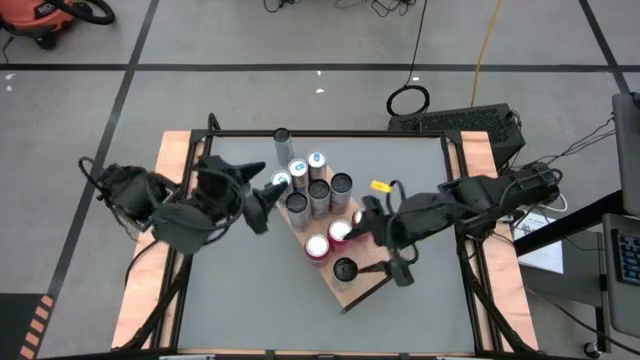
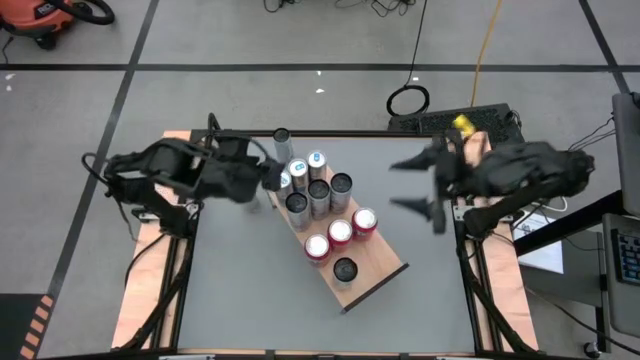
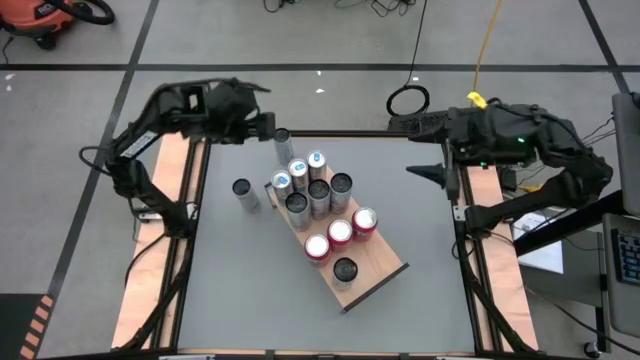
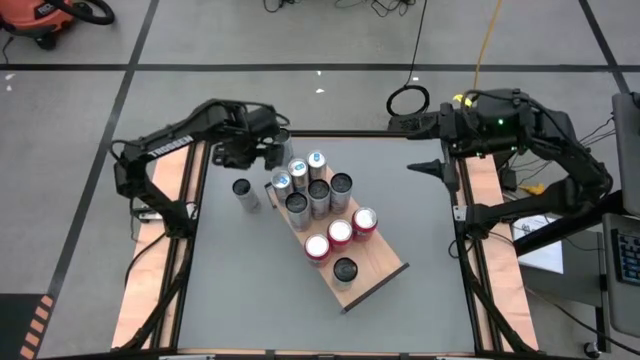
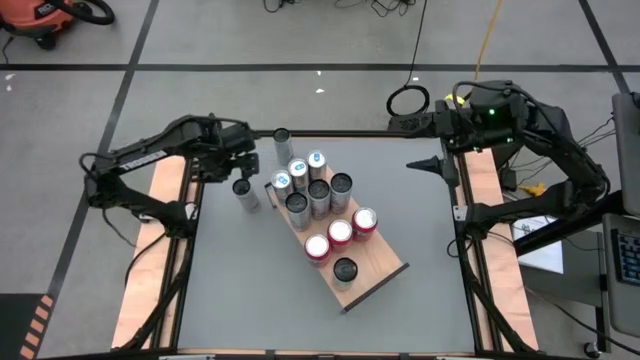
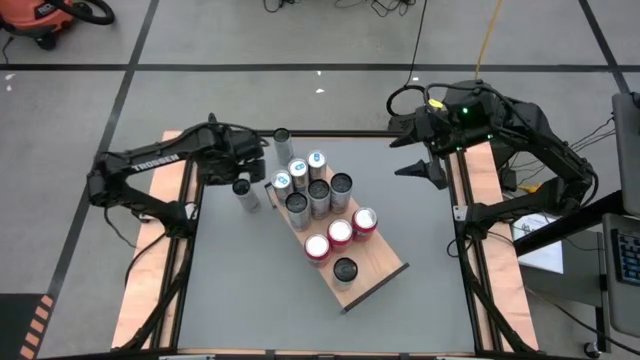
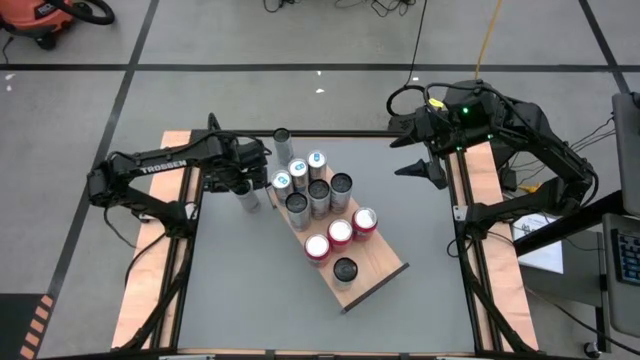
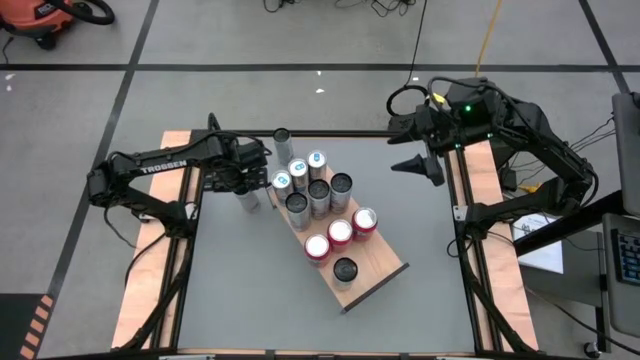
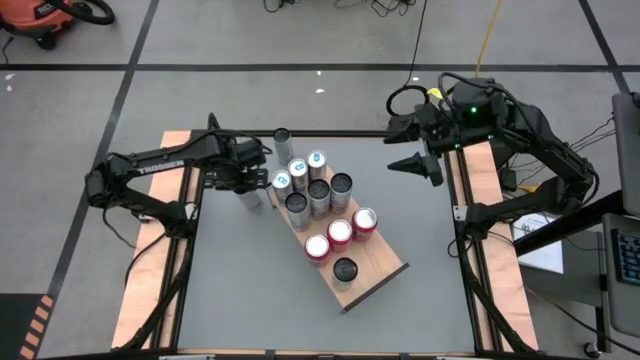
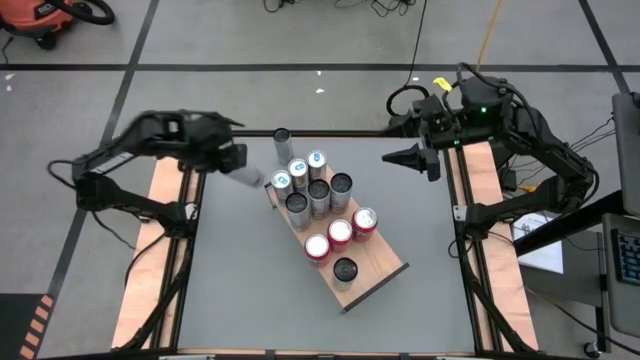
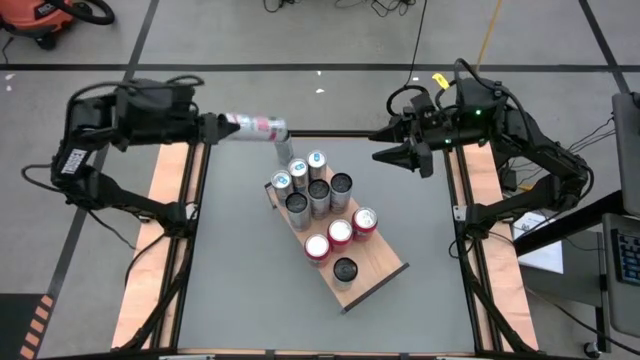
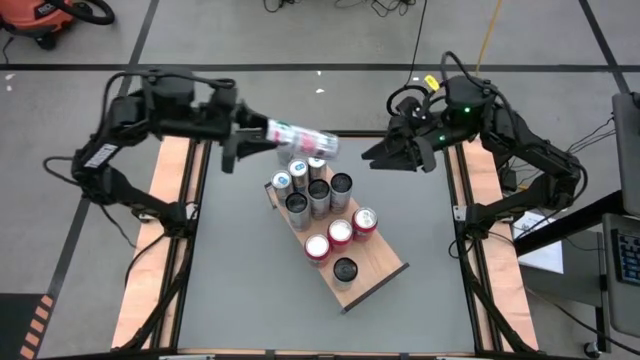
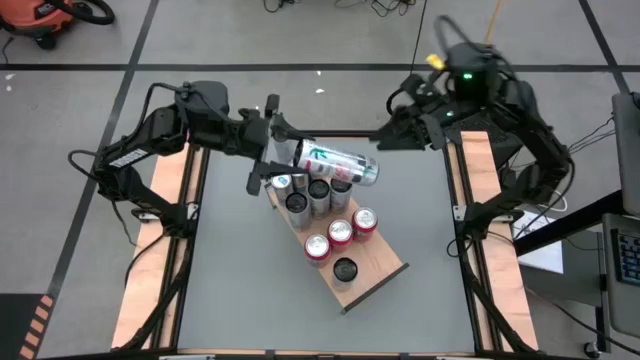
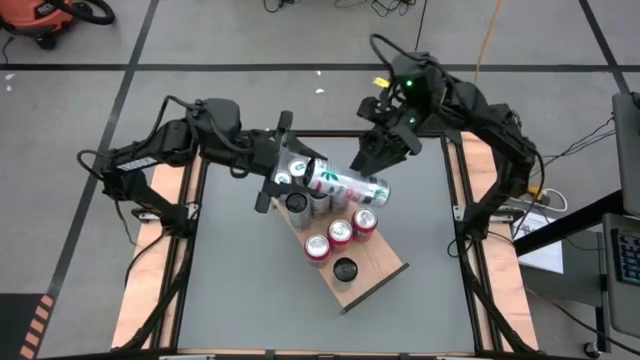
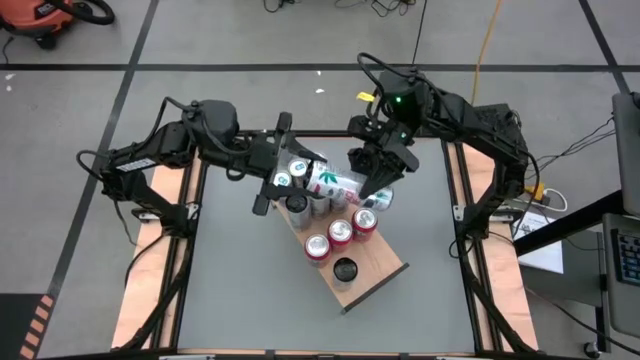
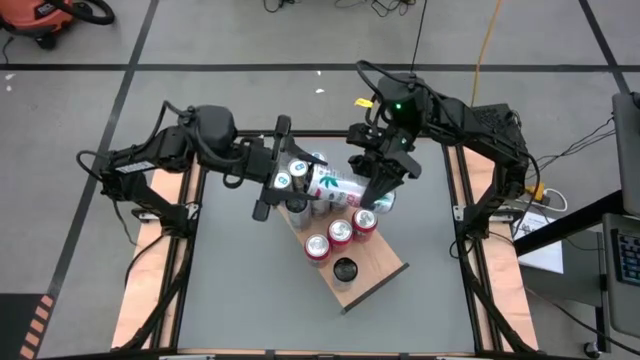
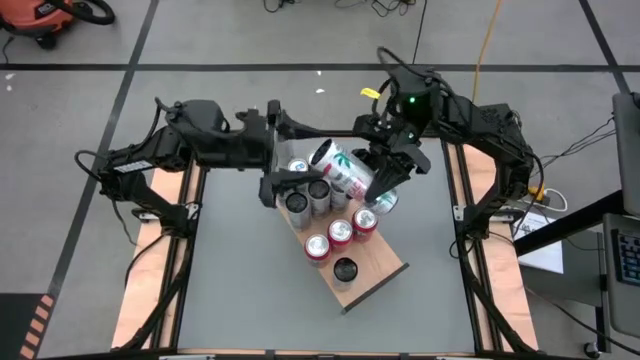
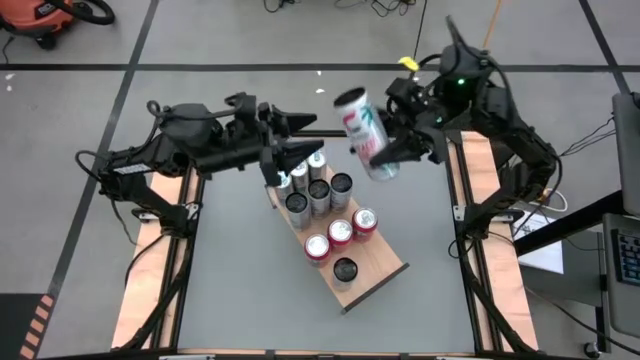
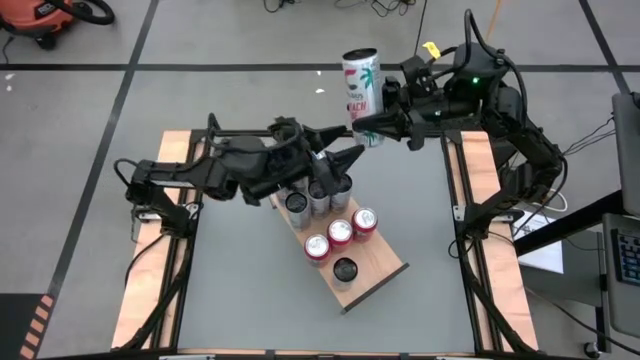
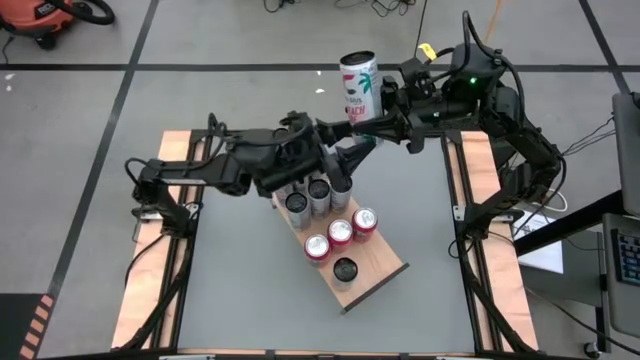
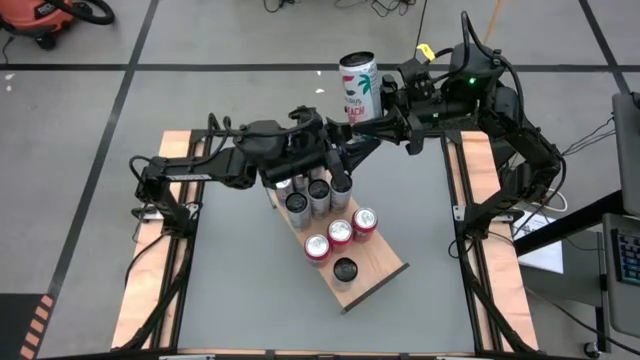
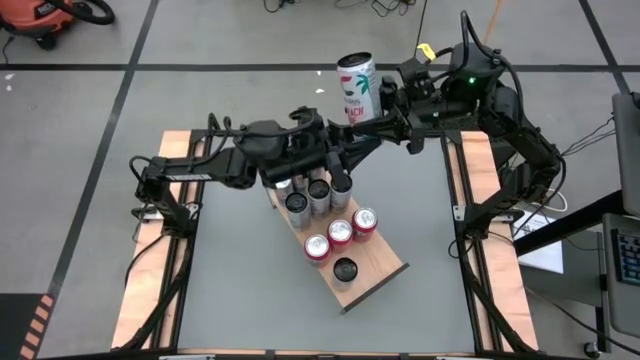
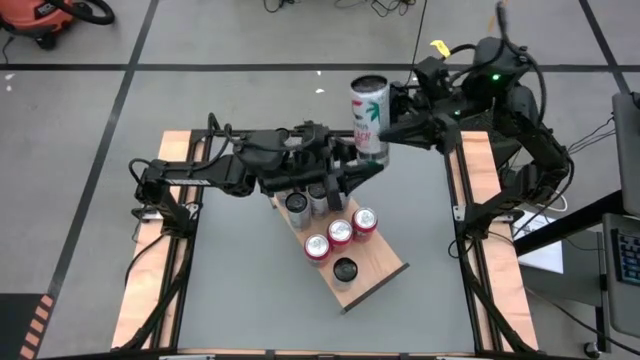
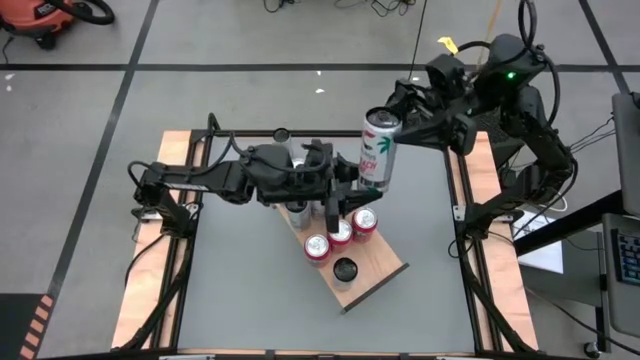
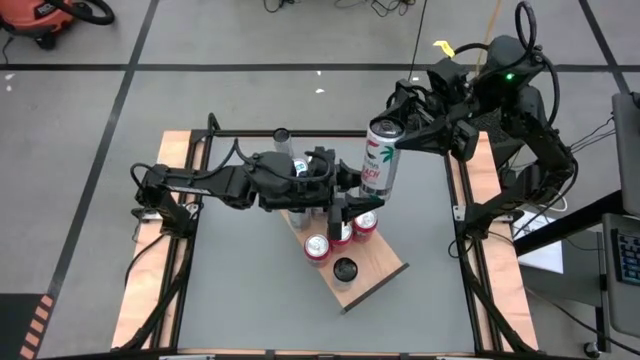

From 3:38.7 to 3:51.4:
Task: Place canned beverage on shelf
Put the bottom red soda can on the shelf aligned with the other red soda can

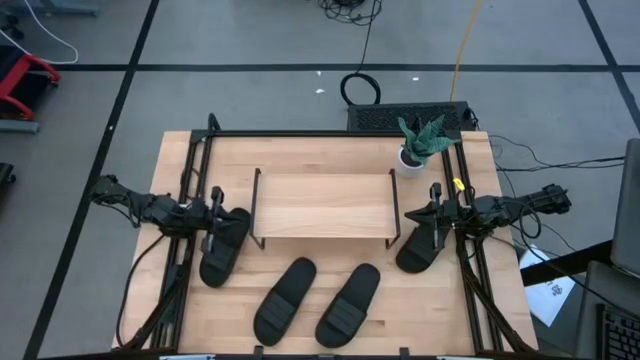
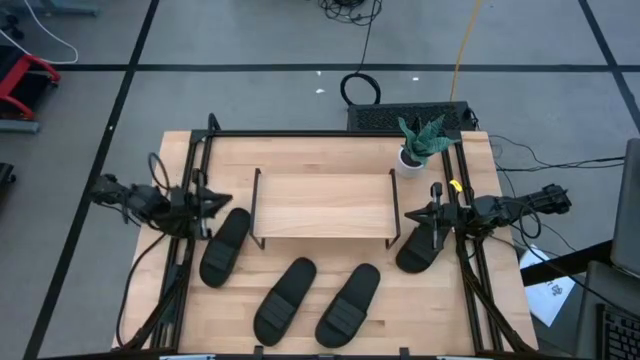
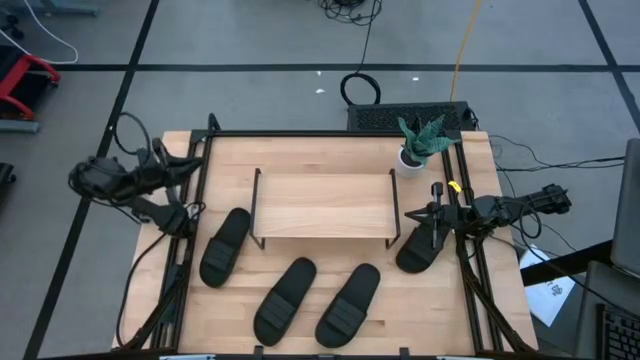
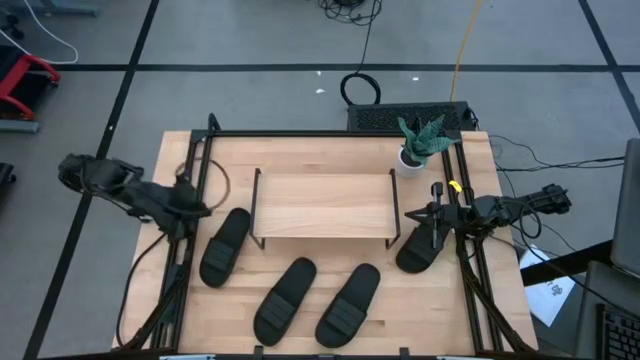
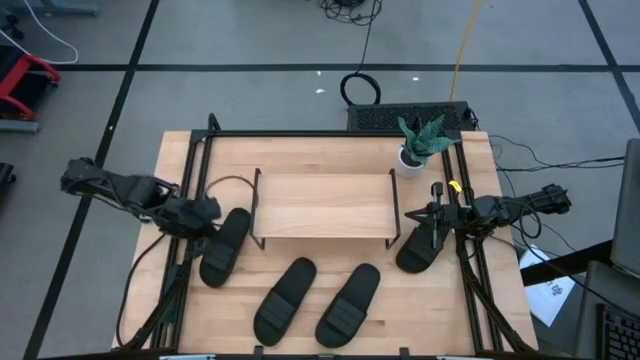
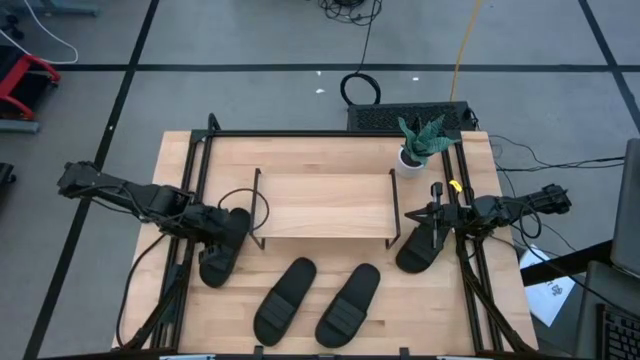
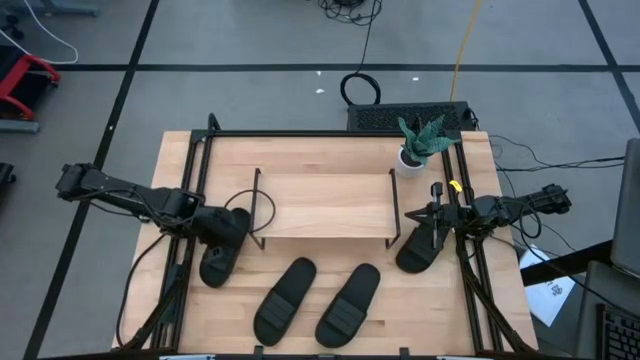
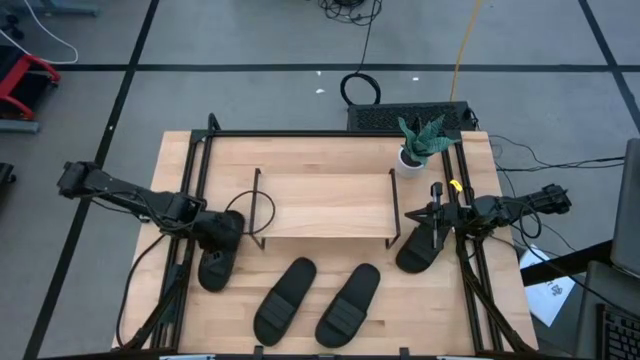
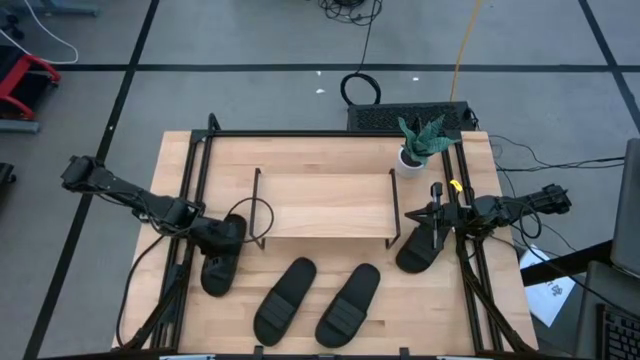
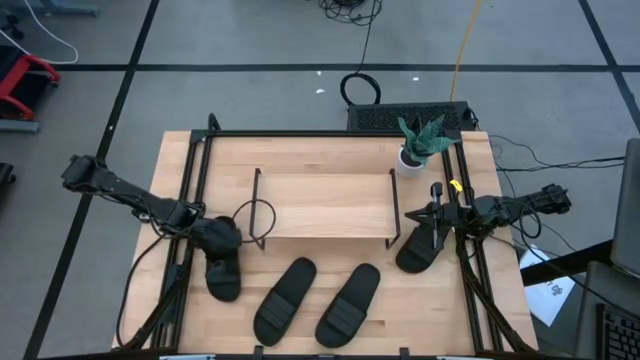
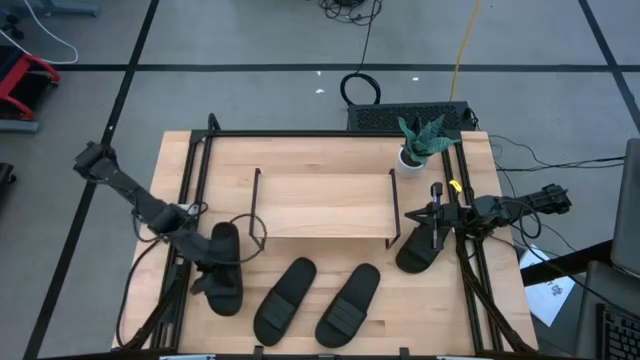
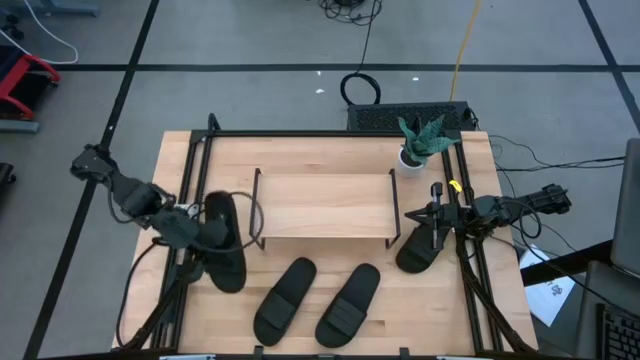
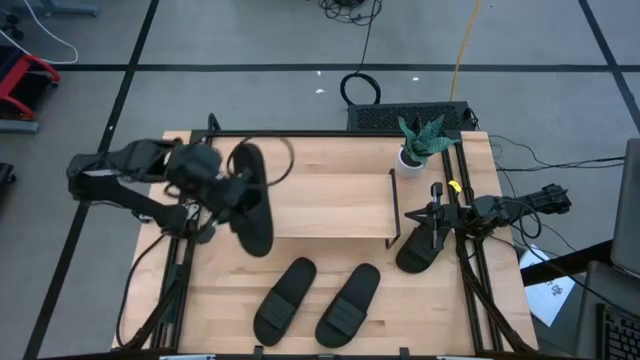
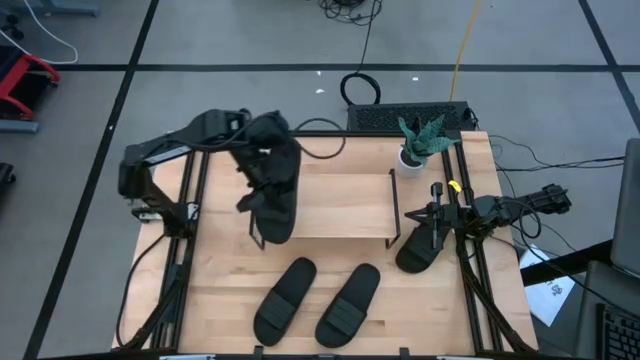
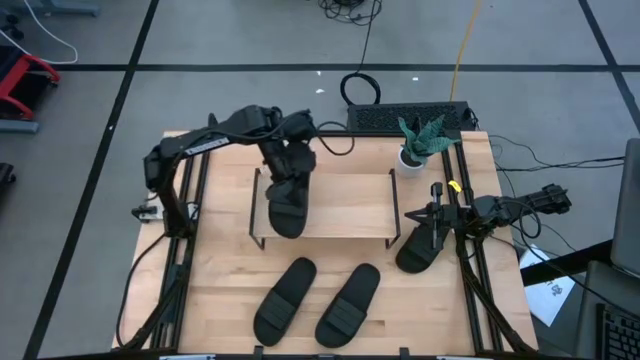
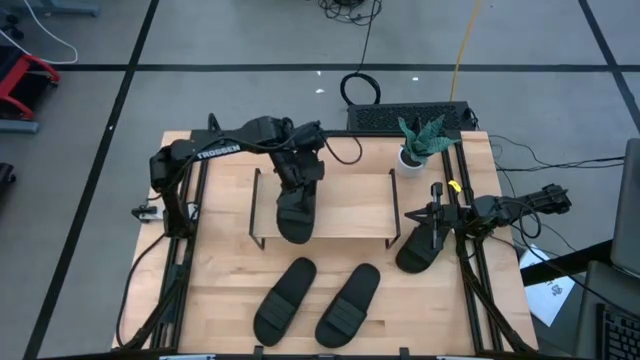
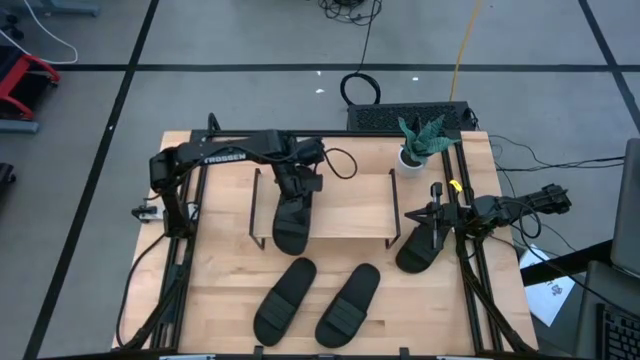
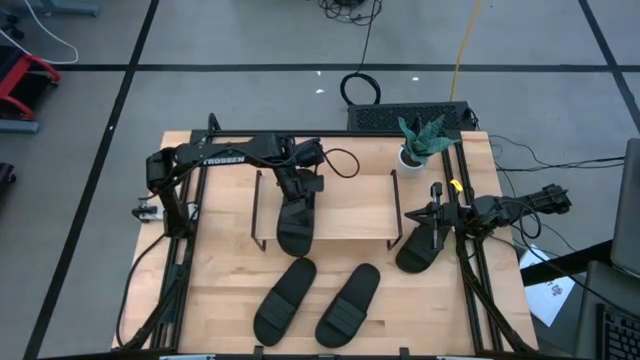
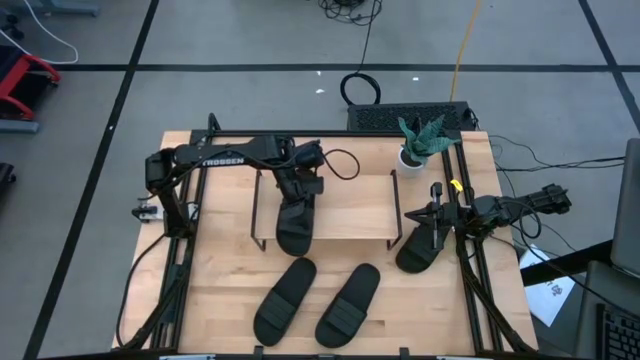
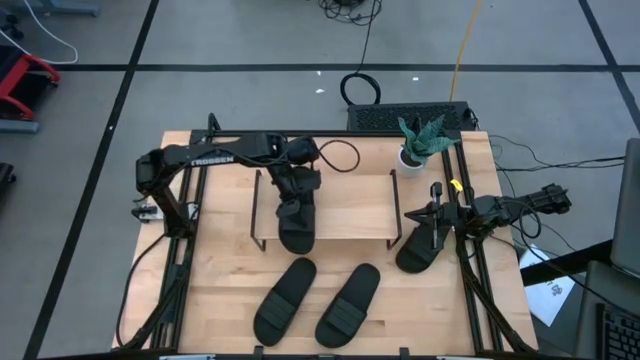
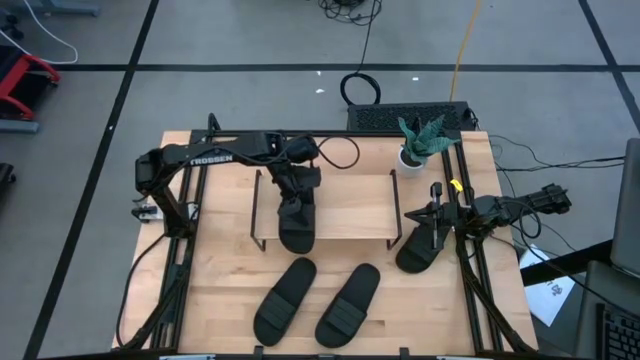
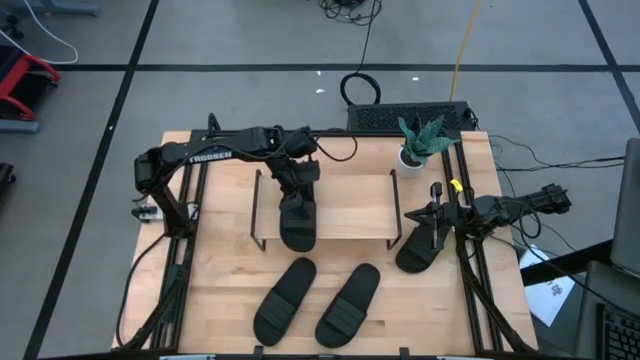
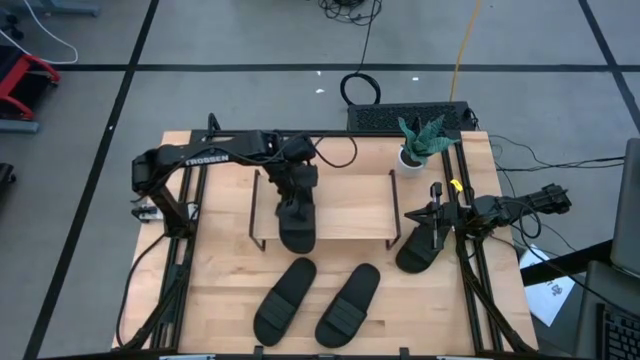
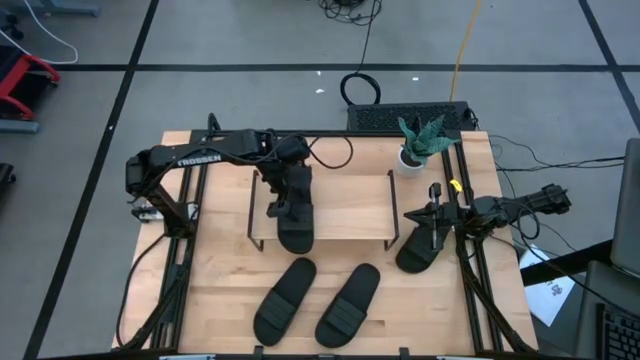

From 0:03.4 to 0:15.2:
Task: Pick and place slides into the shelf
Put the top left black slide on the shelf
